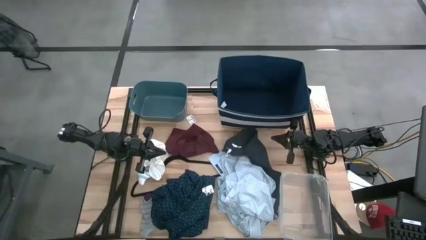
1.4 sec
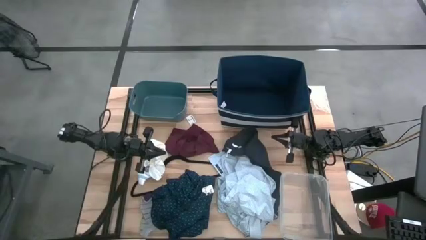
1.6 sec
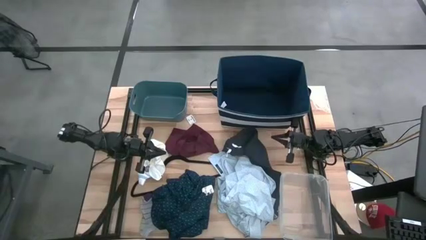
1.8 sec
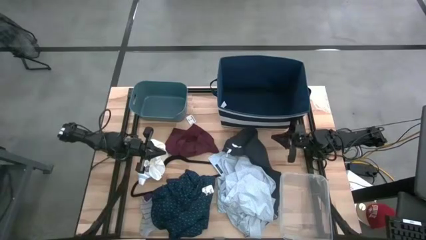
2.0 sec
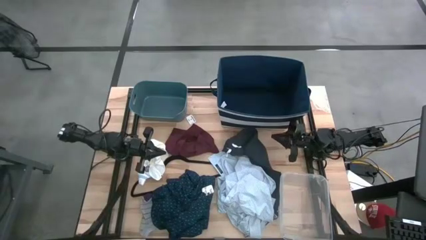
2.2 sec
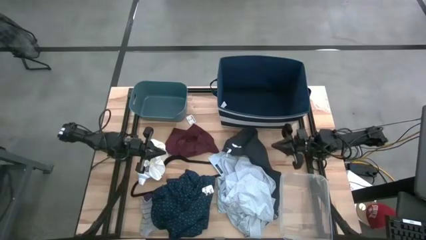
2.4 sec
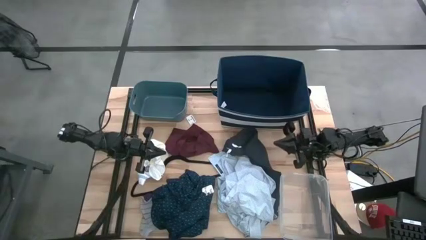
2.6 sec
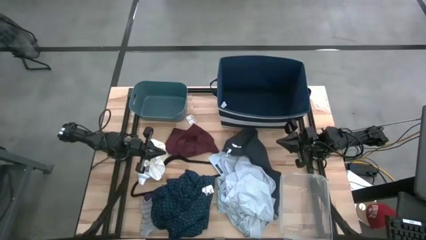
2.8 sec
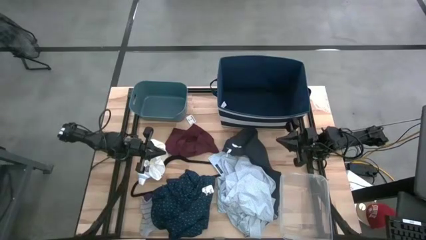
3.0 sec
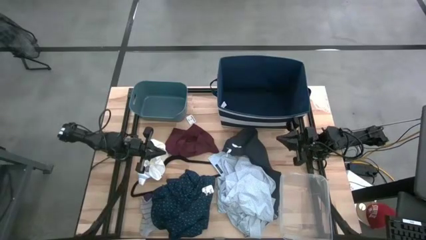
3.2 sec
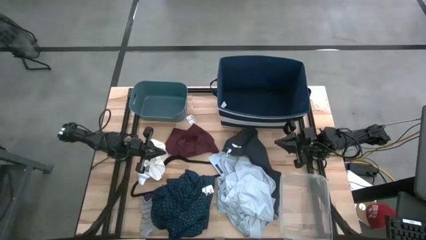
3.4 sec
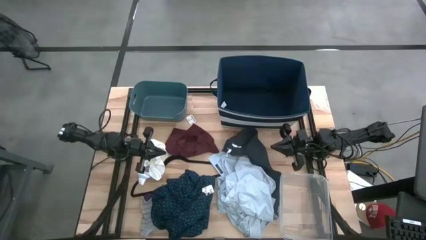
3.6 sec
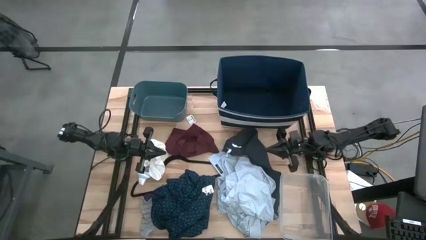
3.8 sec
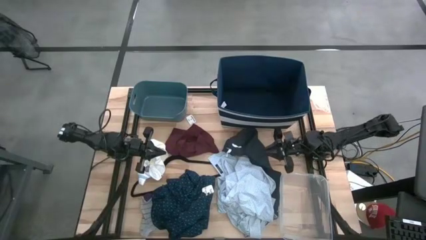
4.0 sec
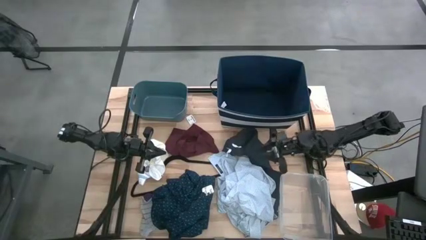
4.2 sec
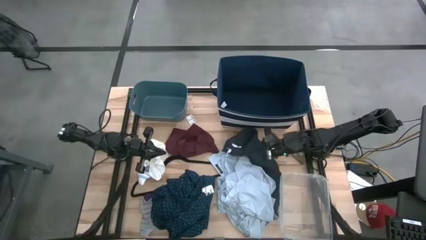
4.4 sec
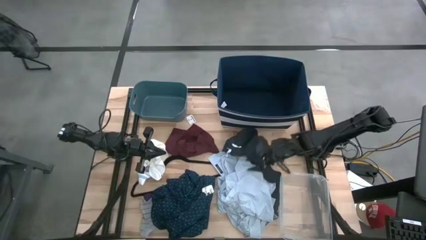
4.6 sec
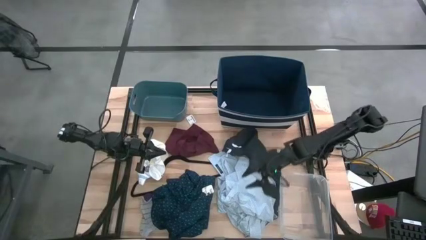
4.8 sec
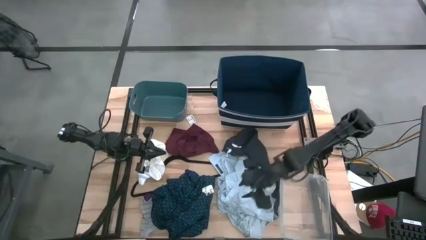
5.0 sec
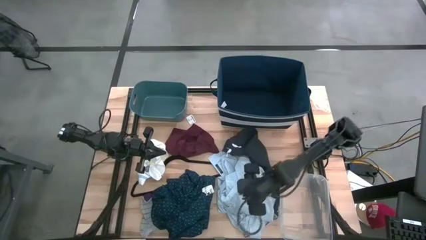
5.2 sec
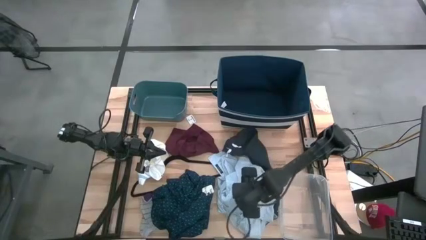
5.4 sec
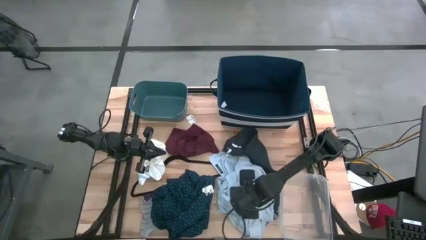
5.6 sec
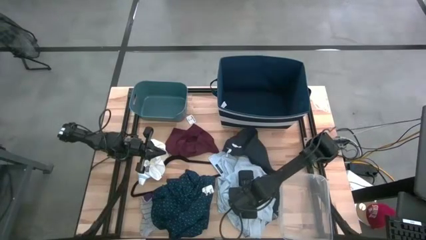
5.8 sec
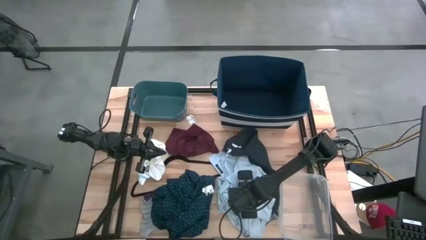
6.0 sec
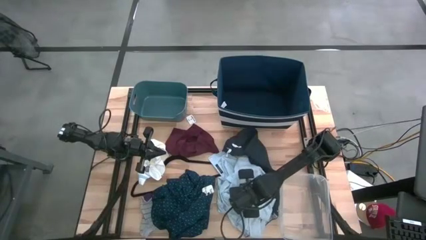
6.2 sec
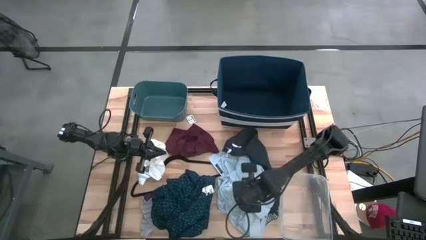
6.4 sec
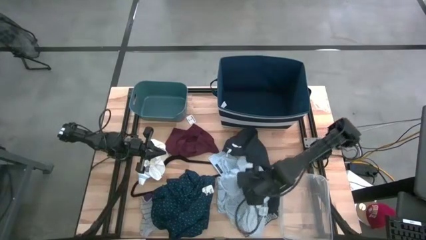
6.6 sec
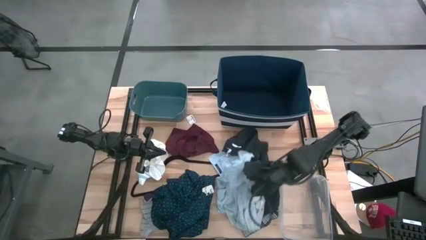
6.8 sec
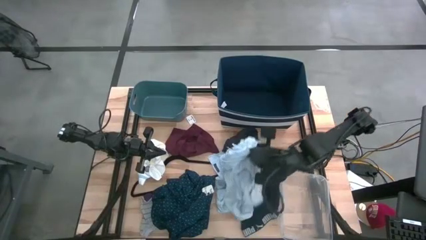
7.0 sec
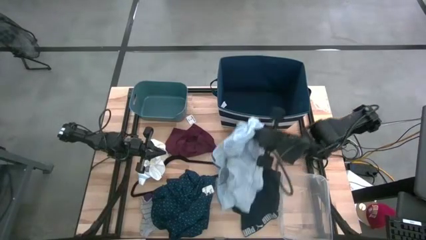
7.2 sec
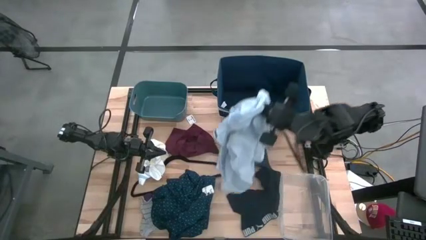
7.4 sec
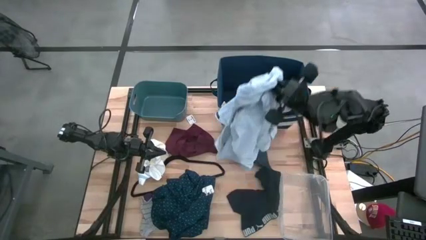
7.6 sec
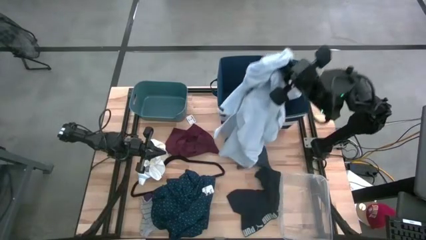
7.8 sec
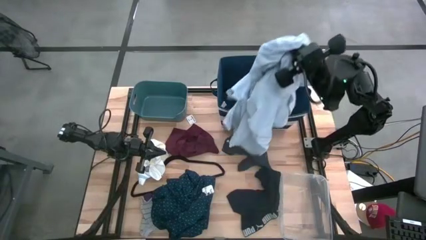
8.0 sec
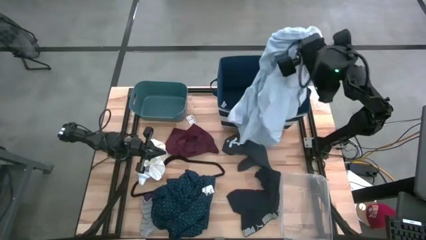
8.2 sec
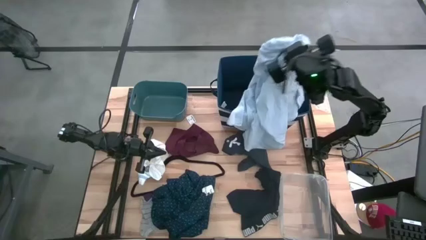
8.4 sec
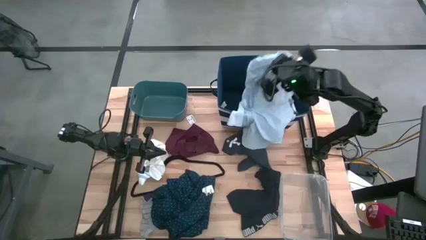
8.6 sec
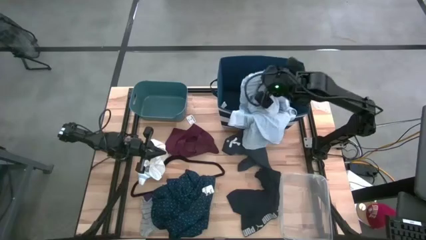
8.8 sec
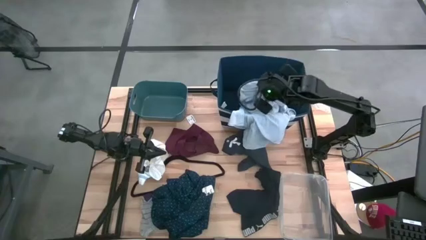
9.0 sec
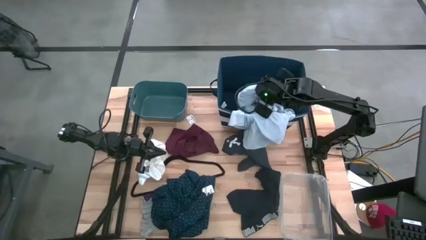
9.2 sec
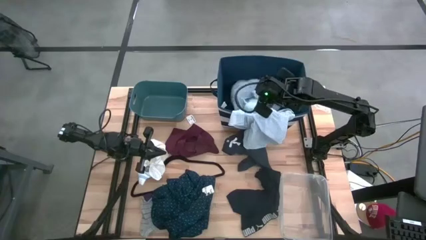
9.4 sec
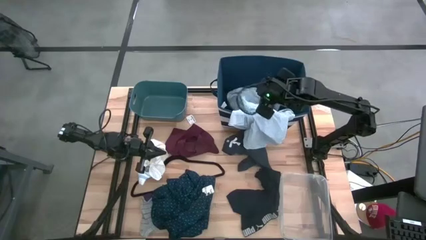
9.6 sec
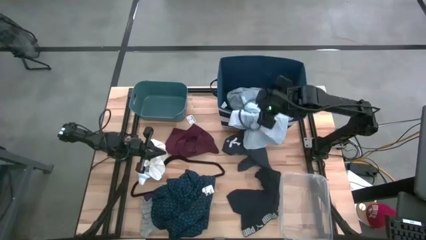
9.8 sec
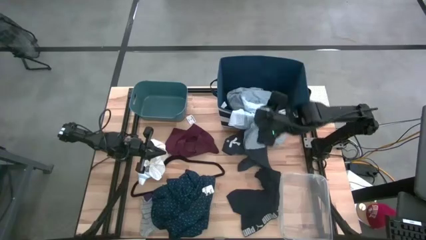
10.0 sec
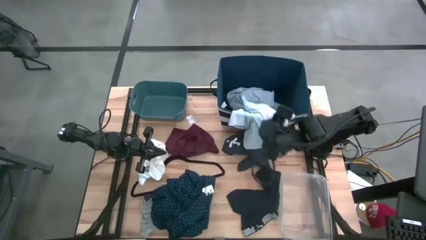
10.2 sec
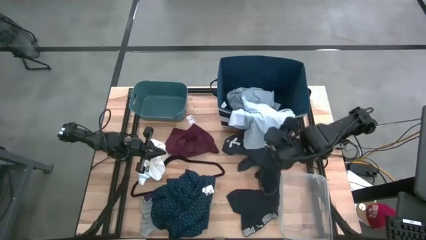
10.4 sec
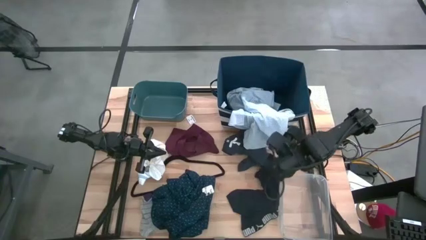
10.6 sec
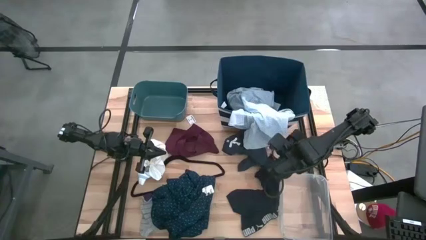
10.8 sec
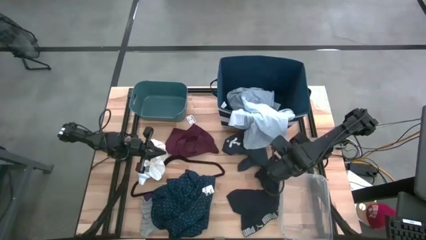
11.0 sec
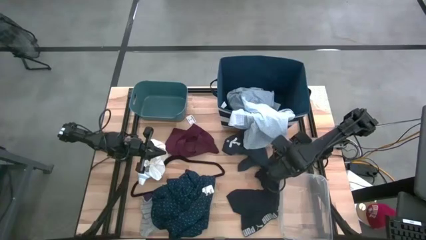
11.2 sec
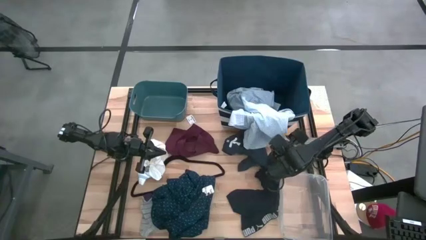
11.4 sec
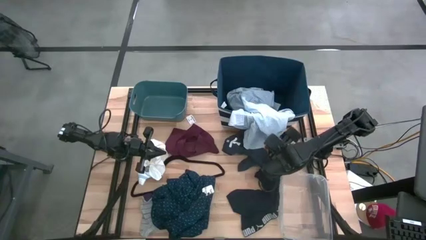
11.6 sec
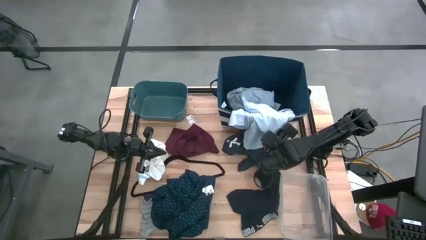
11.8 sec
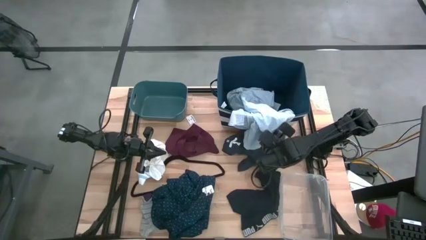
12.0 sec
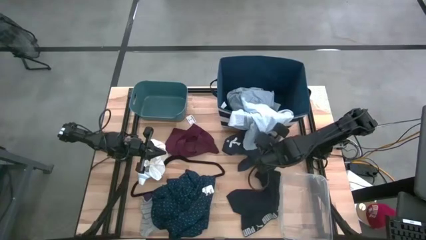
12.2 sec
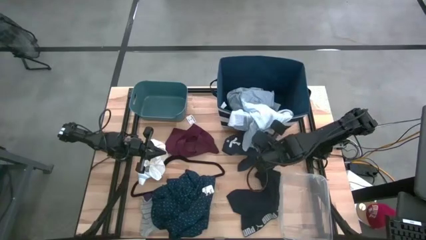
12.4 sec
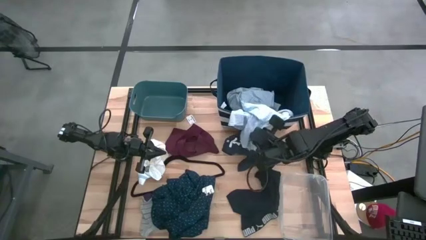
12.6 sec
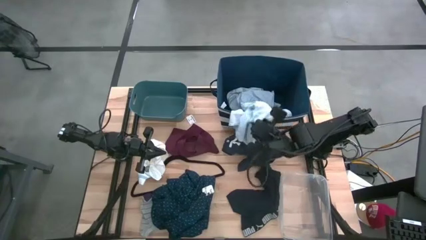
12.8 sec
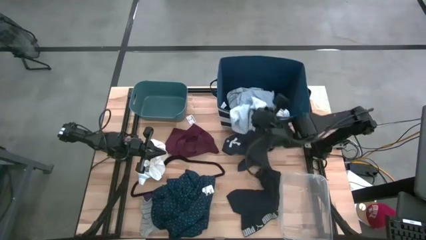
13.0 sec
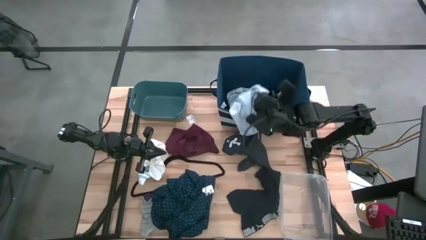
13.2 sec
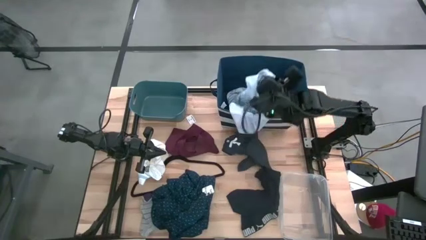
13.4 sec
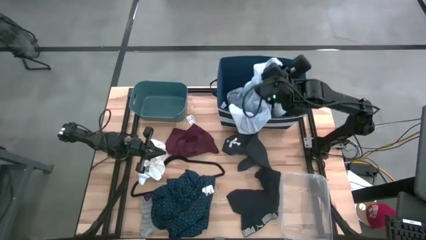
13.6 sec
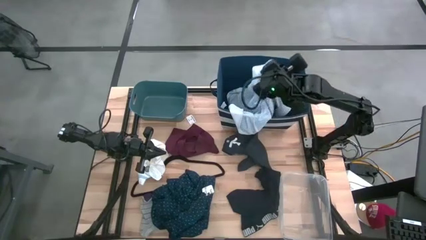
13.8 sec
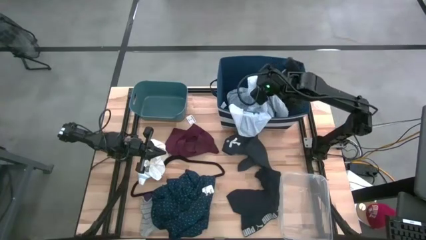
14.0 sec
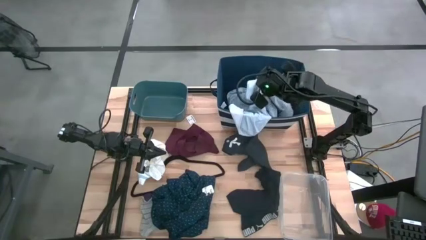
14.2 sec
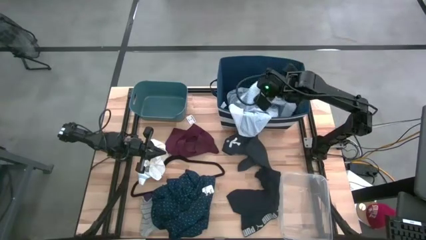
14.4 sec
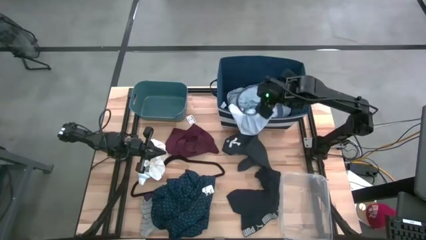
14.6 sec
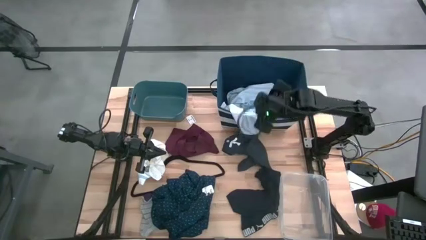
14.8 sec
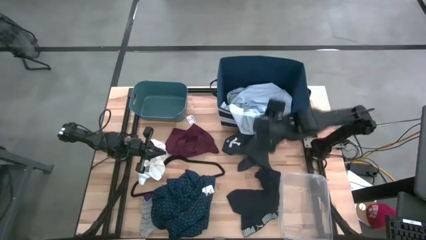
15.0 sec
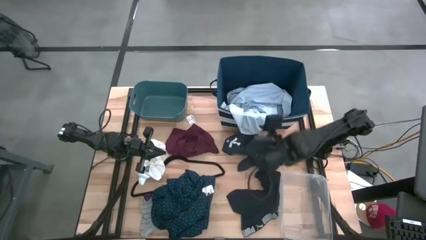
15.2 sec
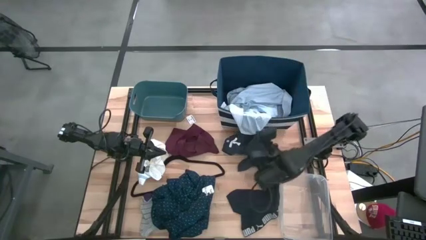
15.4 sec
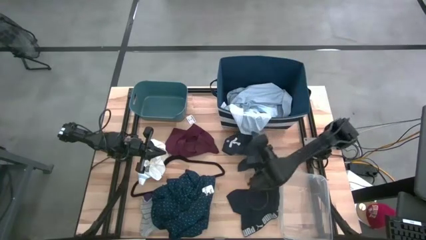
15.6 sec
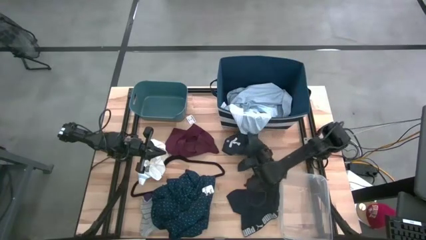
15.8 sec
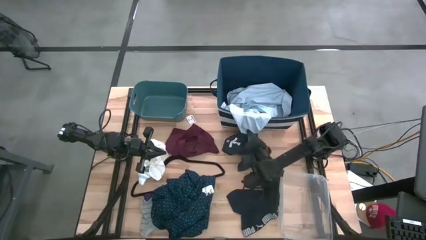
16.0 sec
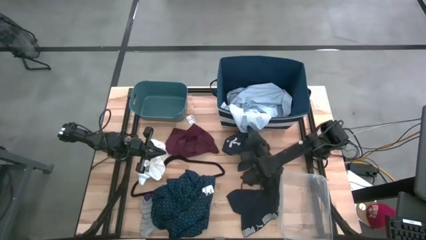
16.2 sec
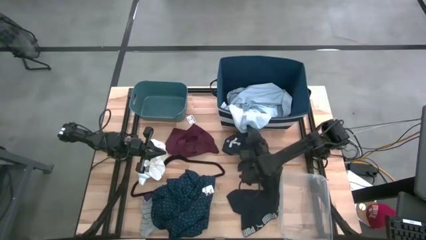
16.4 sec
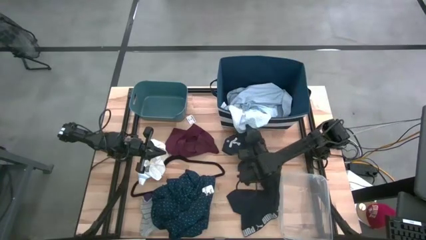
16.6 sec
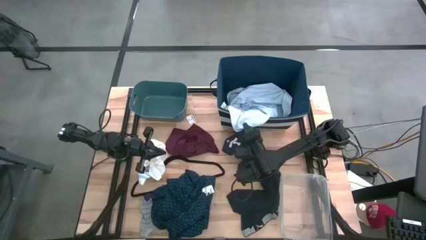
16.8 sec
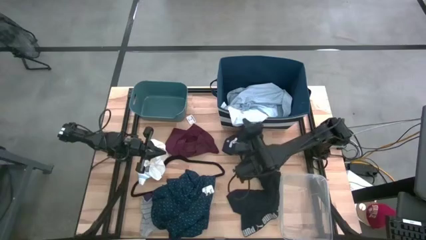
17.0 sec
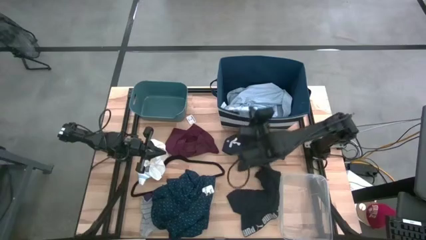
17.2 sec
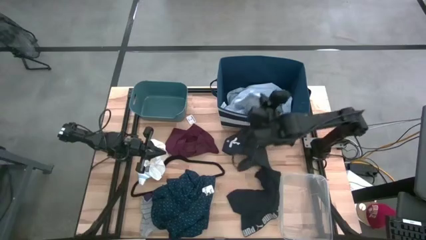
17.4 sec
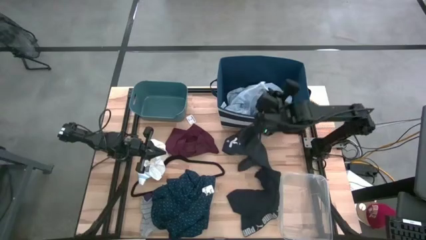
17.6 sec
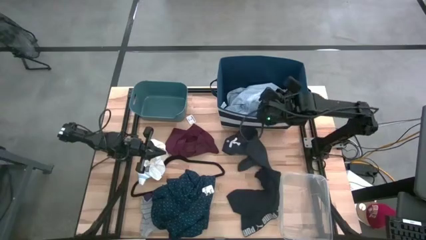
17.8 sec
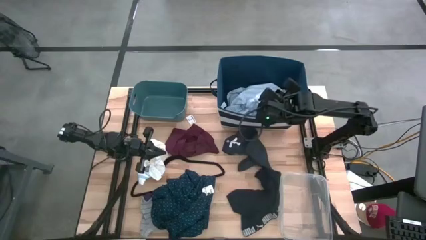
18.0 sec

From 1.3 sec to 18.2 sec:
Task: Pick & Place Cloths
Put the white polo shirt into the blue bin
